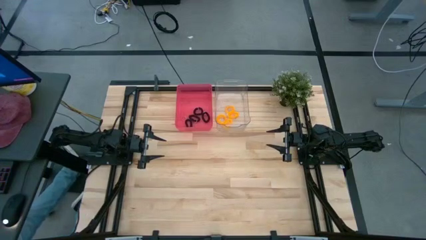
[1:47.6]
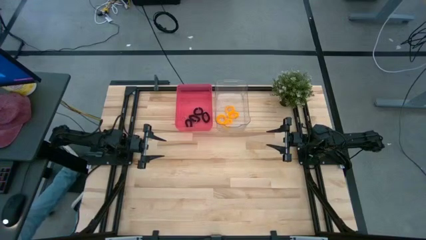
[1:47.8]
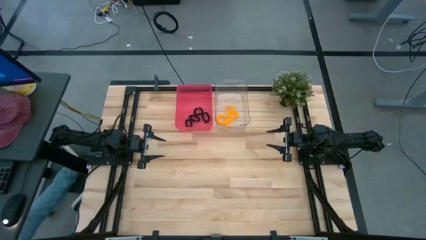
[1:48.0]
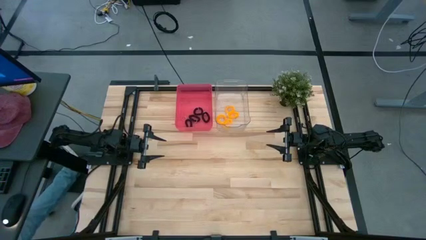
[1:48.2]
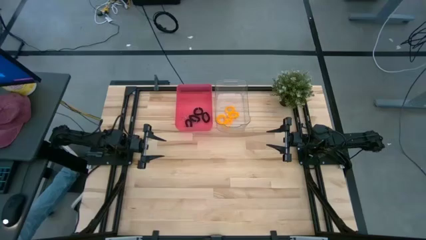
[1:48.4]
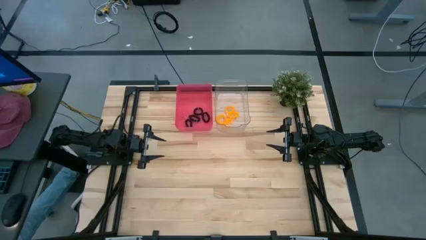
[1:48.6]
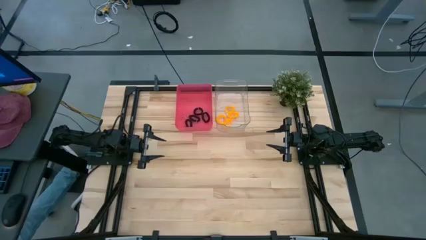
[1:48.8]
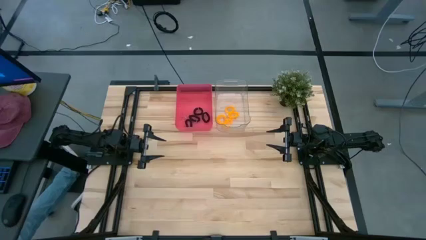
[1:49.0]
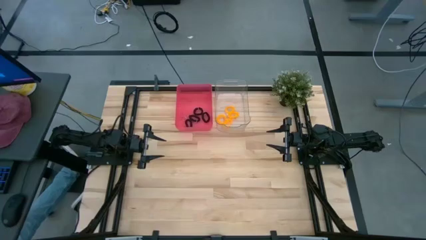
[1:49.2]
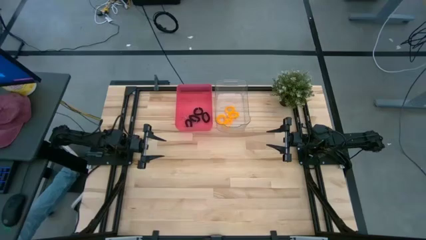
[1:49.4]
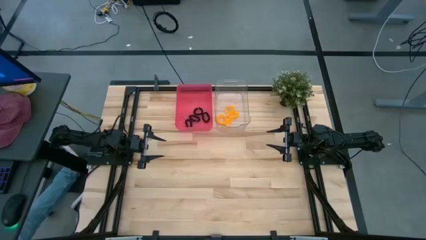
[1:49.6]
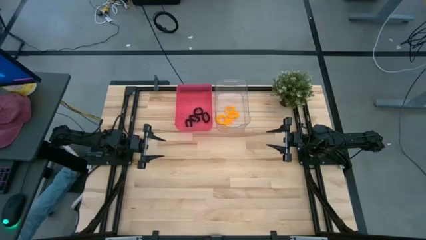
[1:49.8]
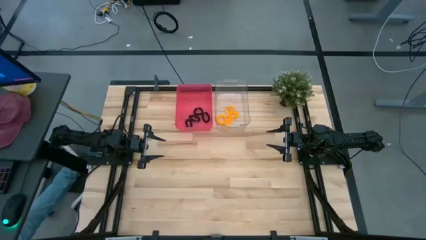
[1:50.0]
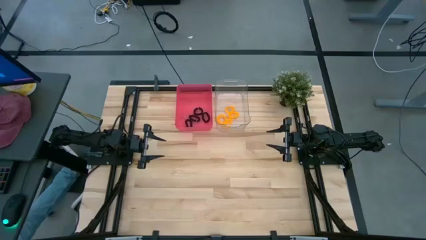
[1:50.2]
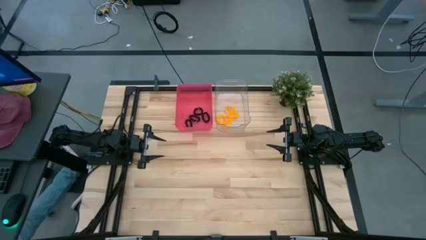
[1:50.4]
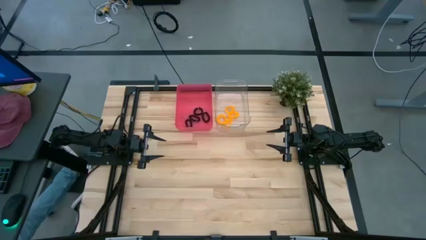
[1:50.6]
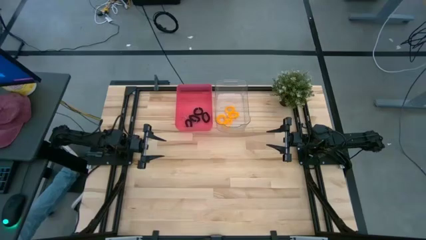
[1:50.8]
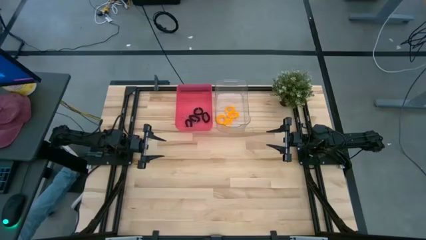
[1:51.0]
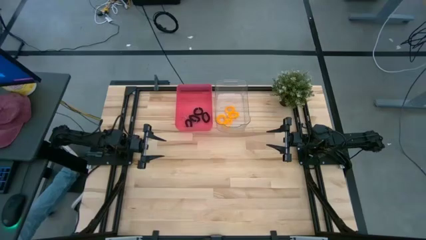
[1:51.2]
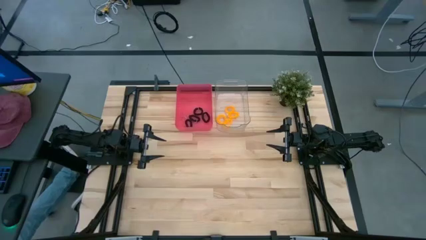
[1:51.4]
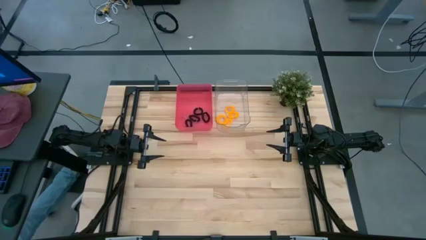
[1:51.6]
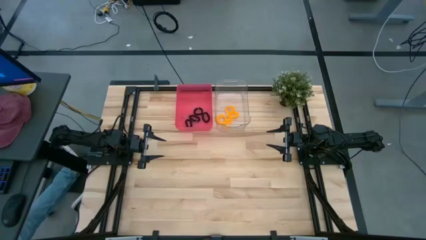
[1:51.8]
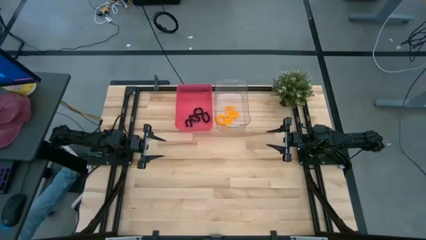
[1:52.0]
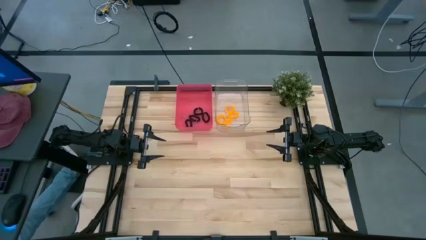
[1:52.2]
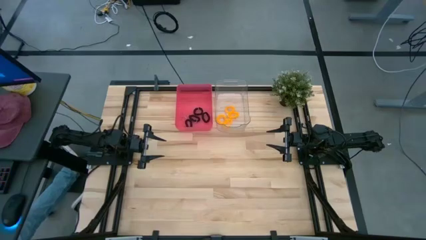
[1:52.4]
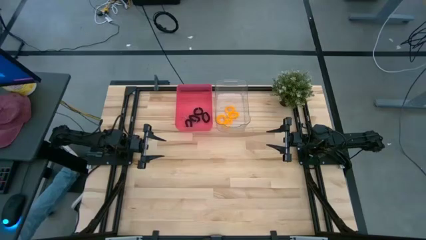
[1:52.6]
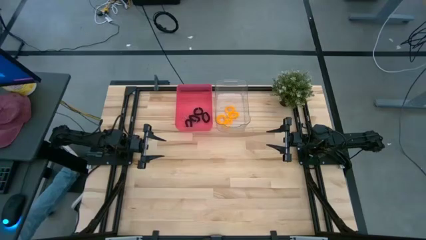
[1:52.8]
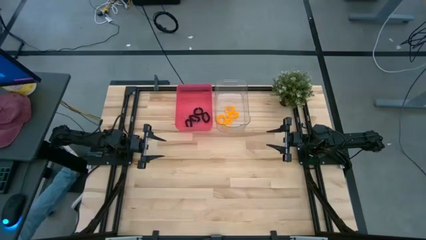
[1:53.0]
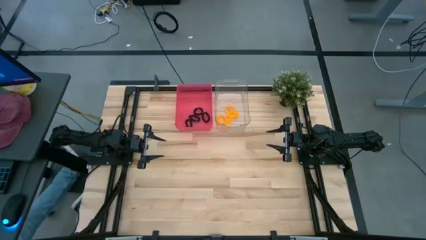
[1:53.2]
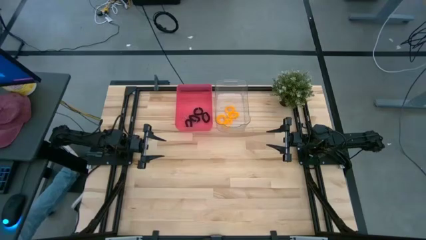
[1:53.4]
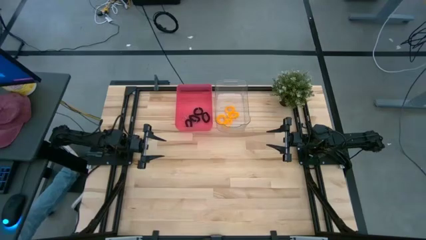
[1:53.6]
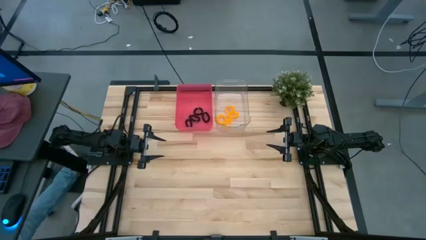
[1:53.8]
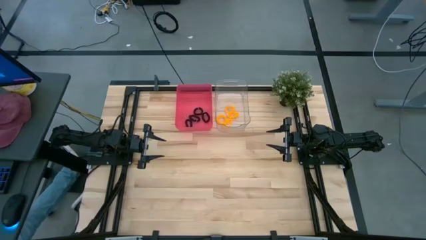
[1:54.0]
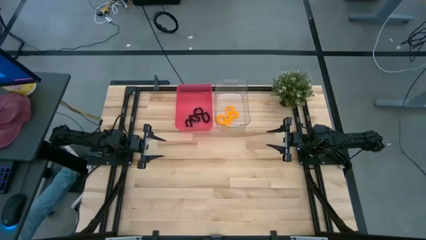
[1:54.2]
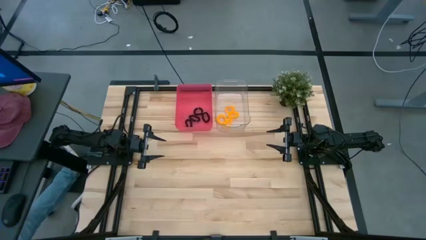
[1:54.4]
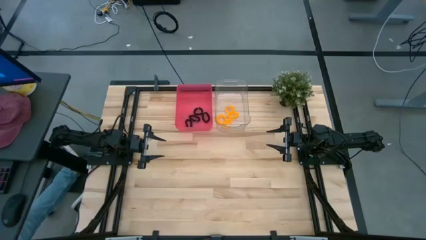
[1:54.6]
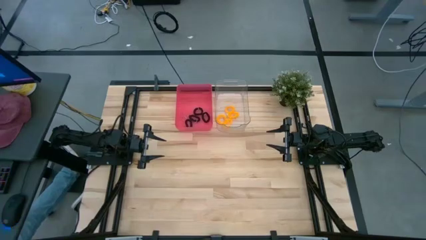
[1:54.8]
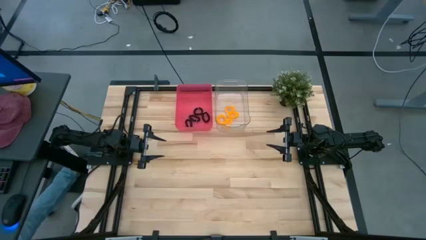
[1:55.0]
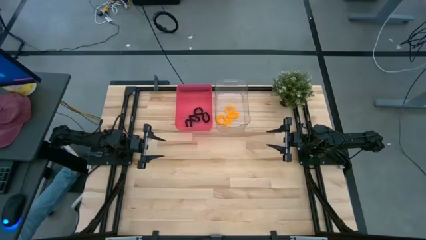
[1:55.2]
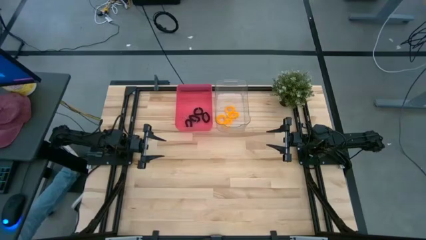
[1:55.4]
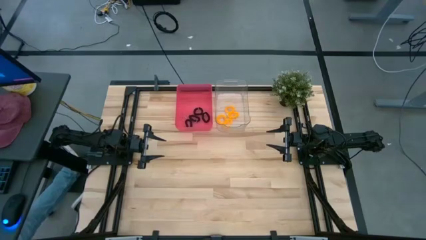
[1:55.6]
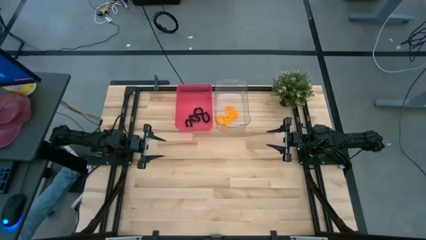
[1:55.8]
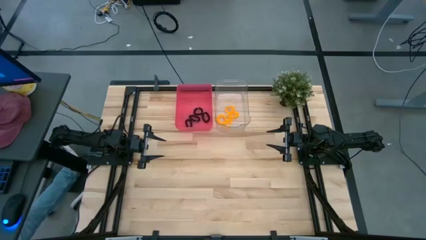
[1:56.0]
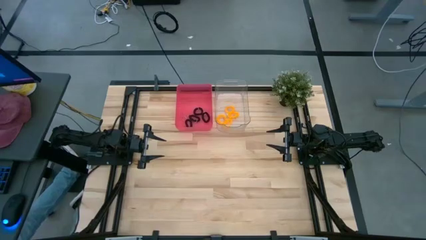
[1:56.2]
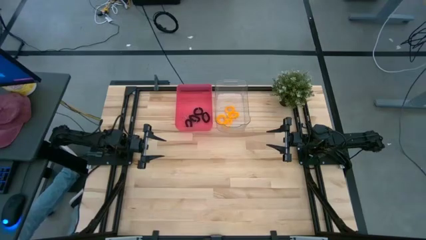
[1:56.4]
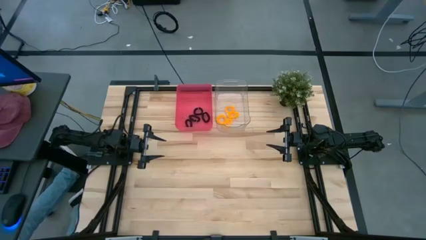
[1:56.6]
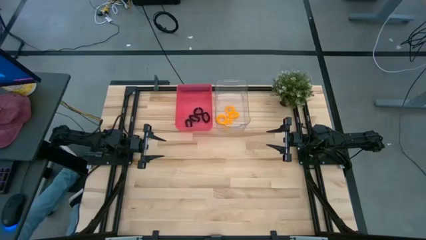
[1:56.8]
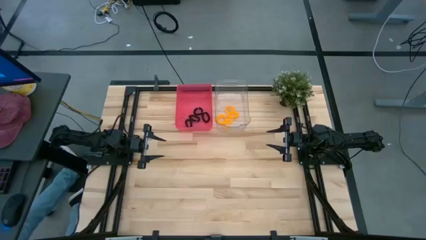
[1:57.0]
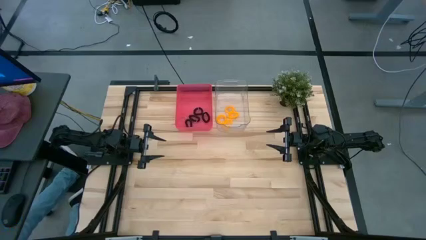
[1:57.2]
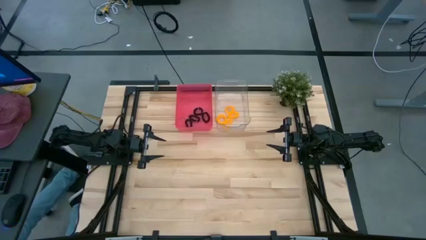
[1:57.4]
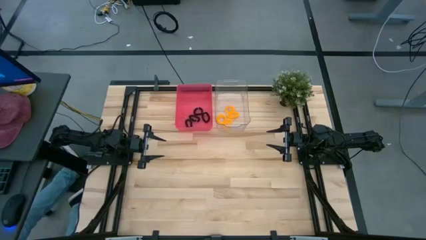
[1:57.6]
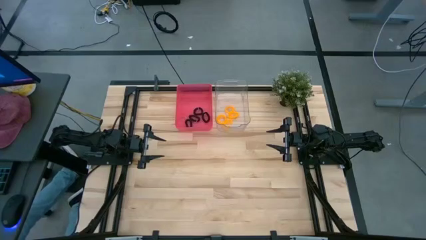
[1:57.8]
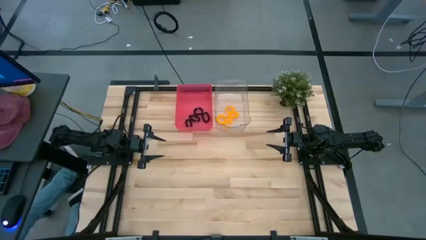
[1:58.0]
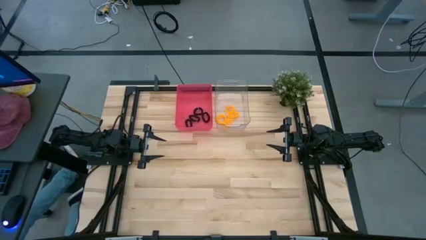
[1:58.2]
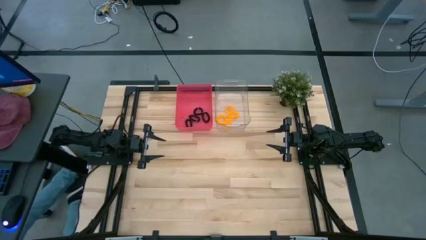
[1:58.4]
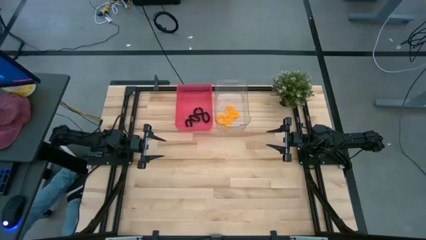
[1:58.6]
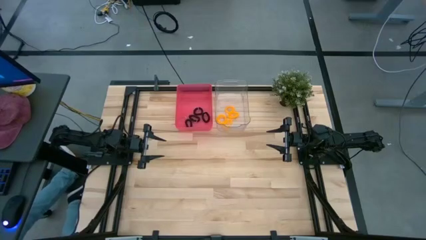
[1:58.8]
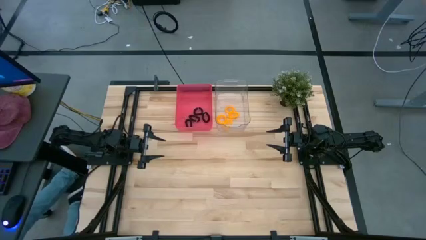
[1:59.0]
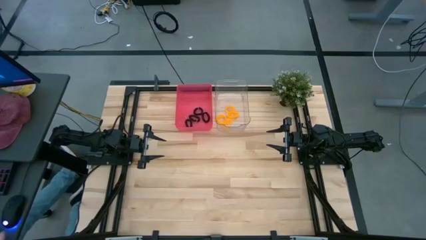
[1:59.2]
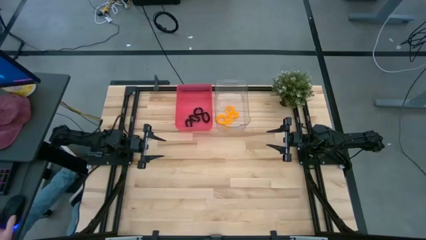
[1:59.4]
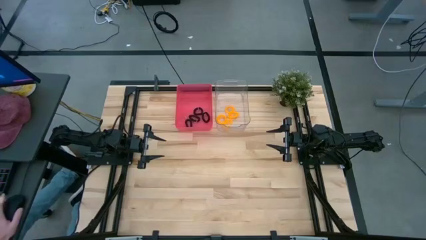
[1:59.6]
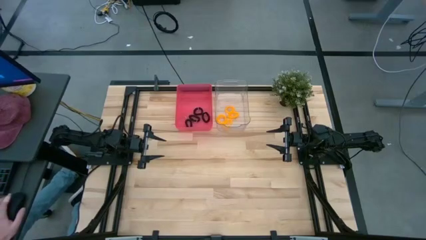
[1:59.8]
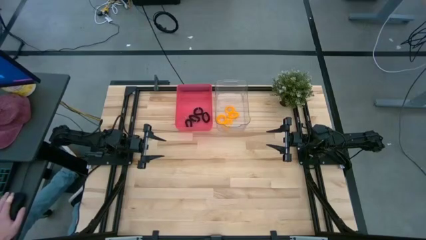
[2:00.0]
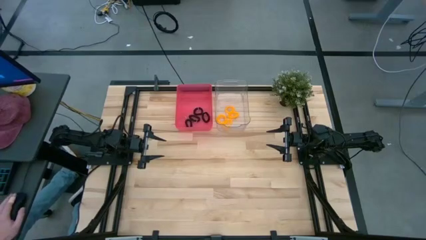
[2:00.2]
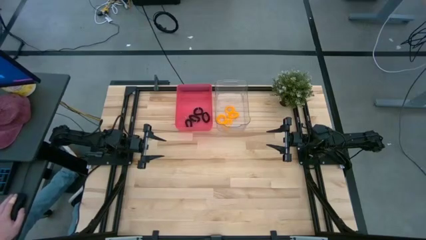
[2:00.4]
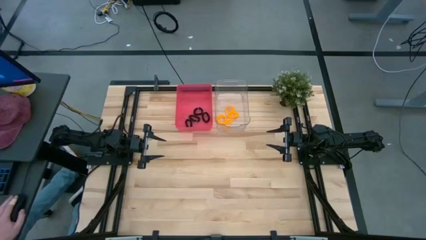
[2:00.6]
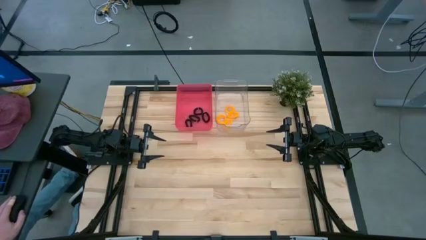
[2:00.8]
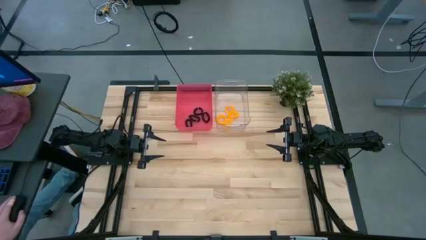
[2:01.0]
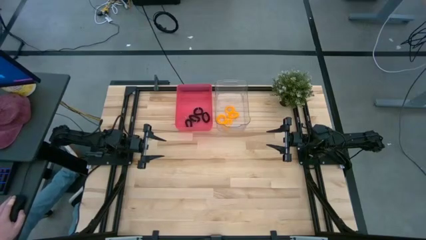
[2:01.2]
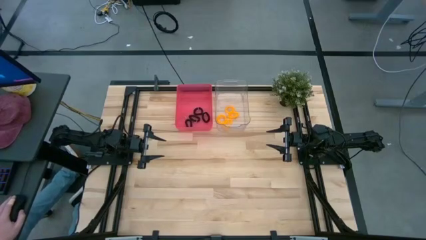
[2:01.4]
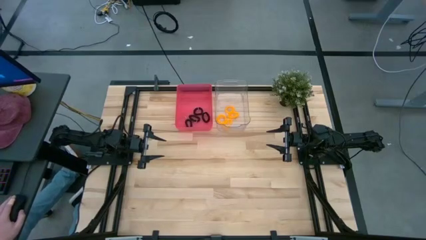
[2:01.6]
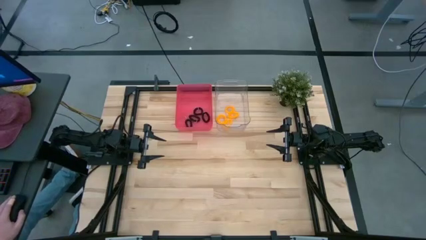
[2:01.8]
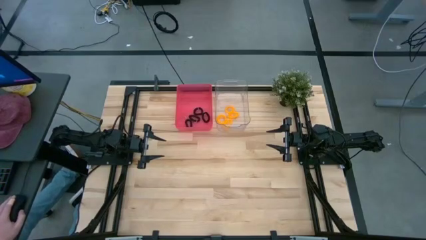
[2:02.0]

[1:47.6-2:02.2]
Task: Sort spring keychains
Return to Home Position

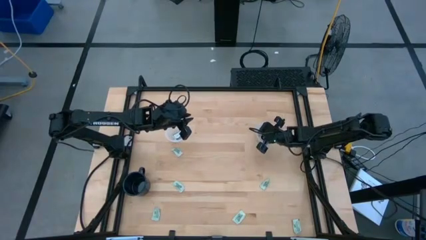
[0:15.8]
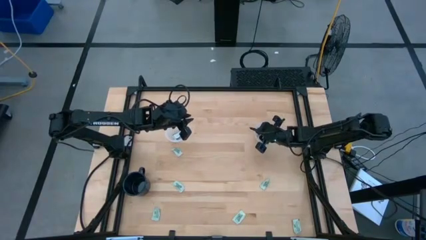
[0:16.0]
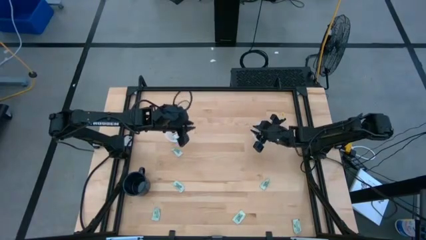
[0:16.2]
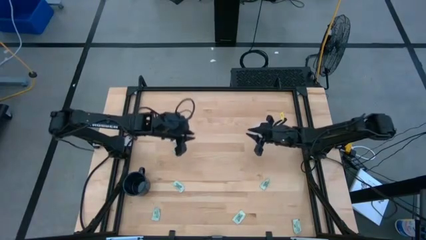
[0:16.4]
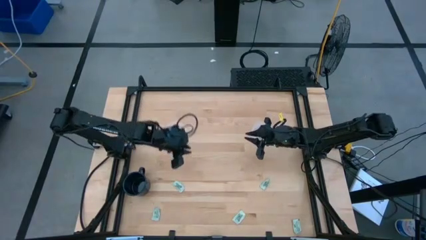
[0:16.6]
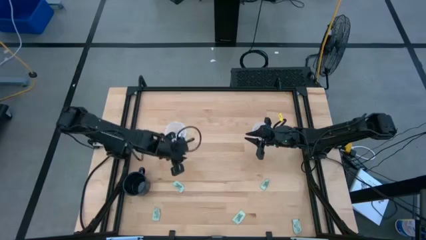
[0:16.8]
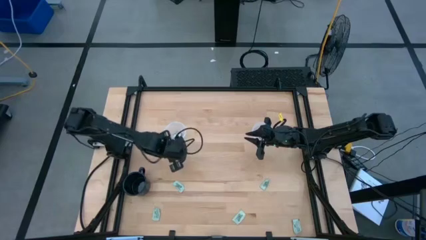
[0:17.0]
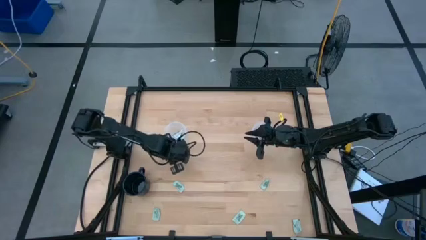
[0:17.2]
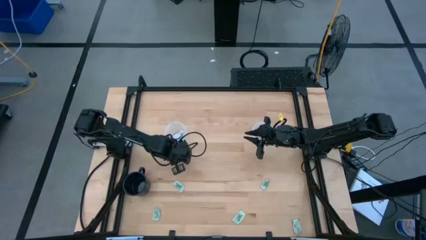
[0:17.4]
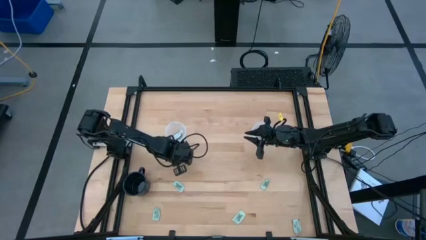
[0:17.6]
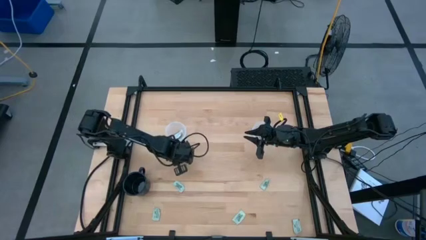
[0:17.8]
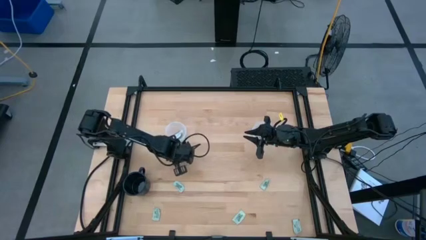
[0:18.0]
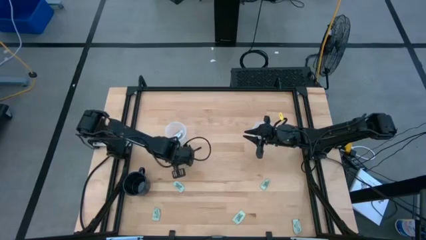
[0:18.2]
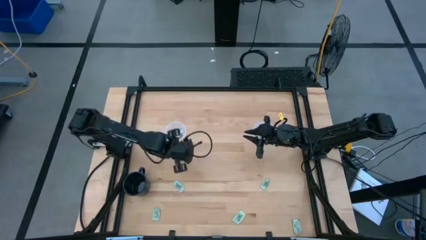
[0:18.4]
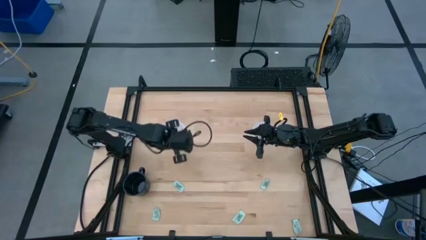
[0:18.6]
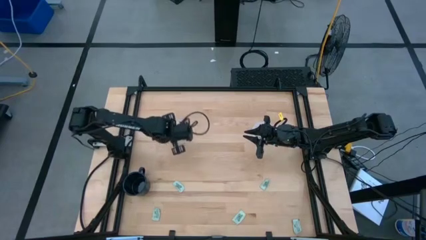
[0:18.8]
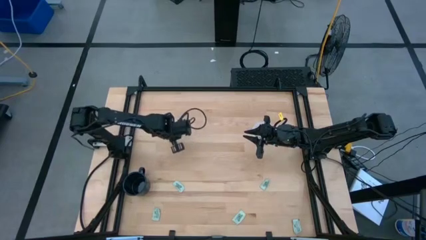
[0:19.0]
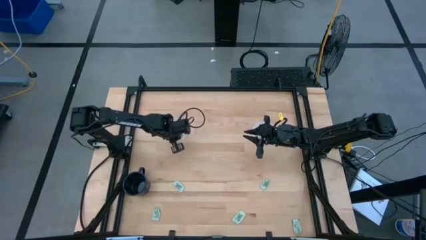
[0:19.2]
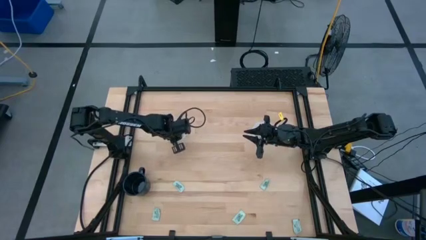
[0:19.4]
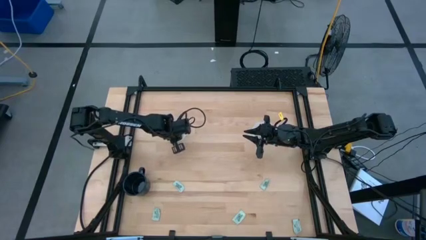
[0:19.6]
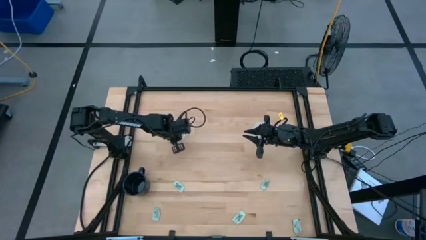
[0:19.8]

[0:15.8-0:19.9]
Task: Pick and place Stevia / Truvia into bins
Put the stevia packet into the left transparent container
